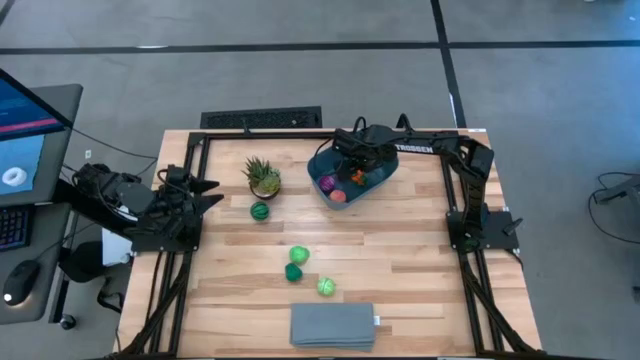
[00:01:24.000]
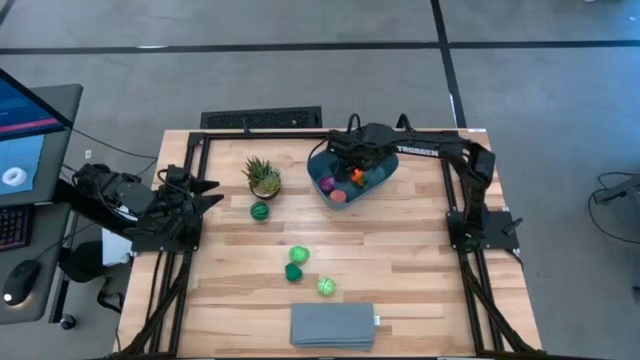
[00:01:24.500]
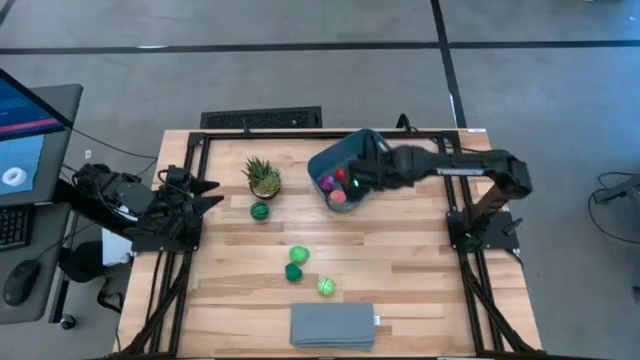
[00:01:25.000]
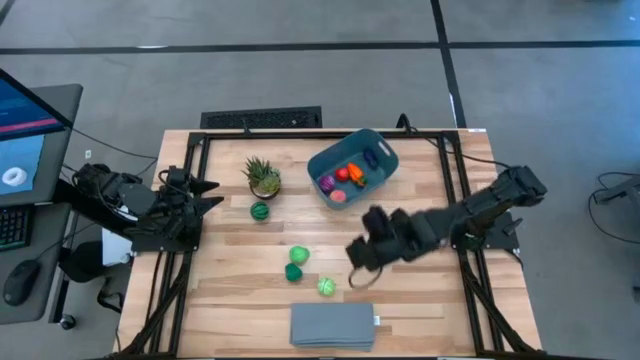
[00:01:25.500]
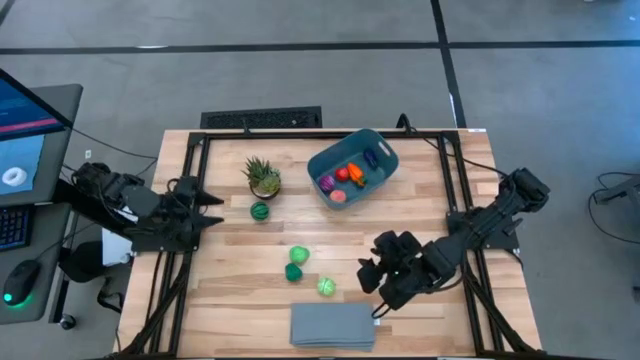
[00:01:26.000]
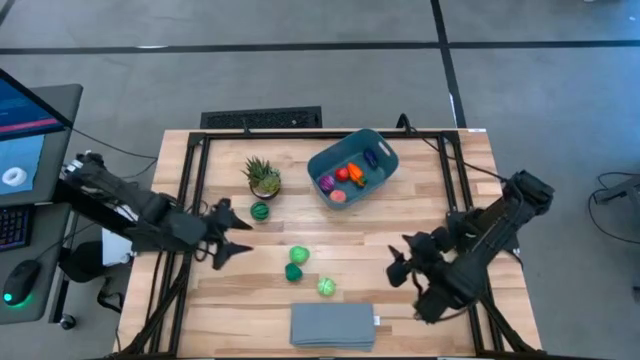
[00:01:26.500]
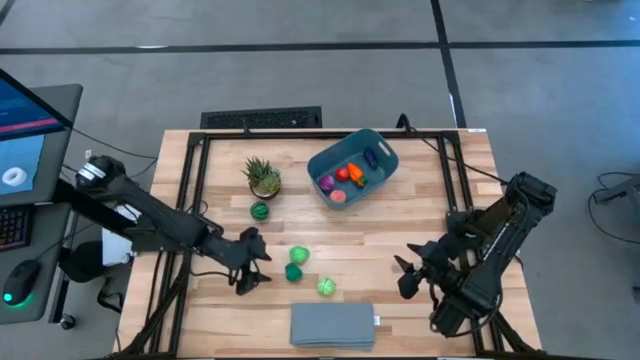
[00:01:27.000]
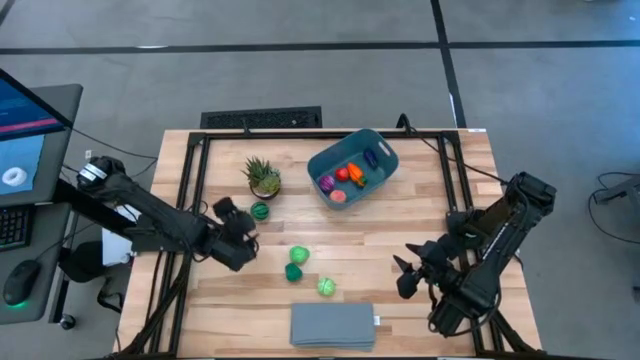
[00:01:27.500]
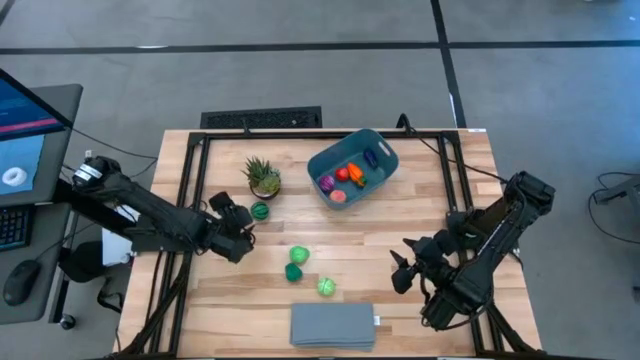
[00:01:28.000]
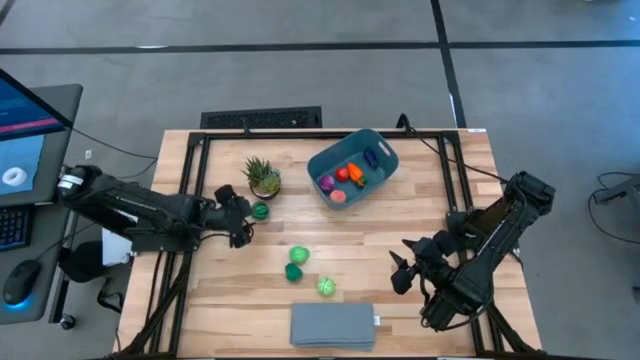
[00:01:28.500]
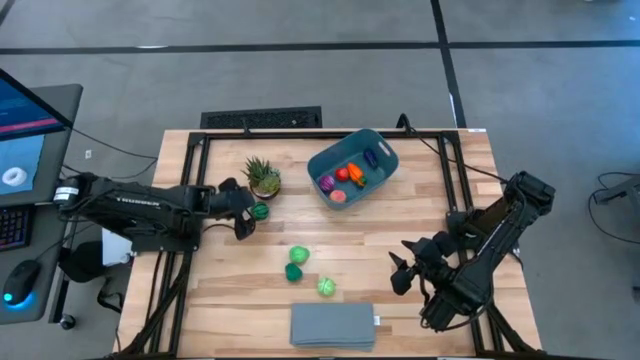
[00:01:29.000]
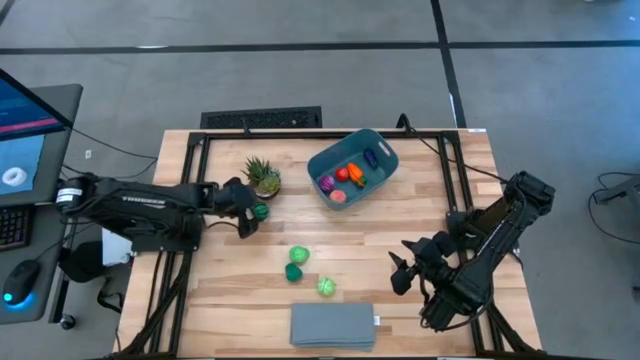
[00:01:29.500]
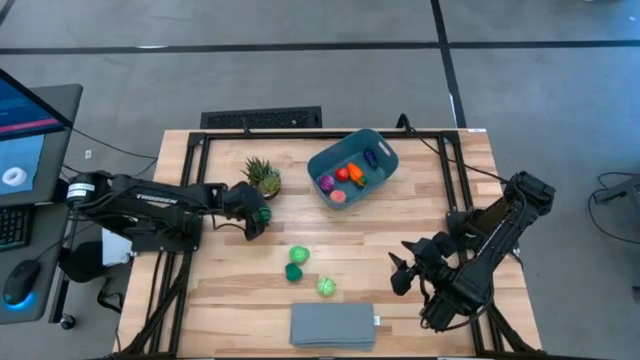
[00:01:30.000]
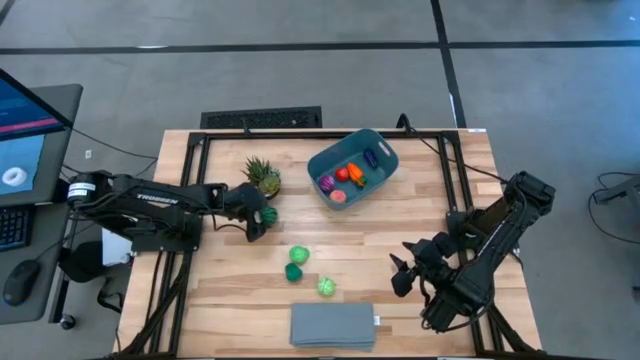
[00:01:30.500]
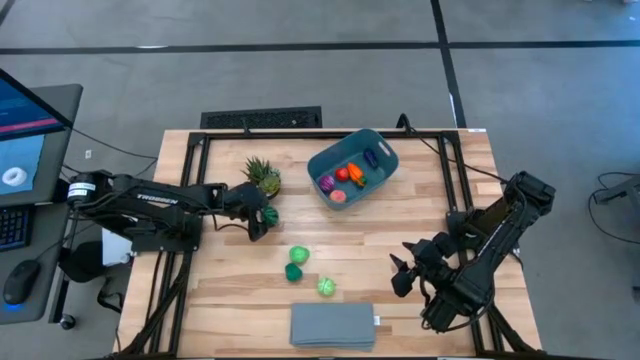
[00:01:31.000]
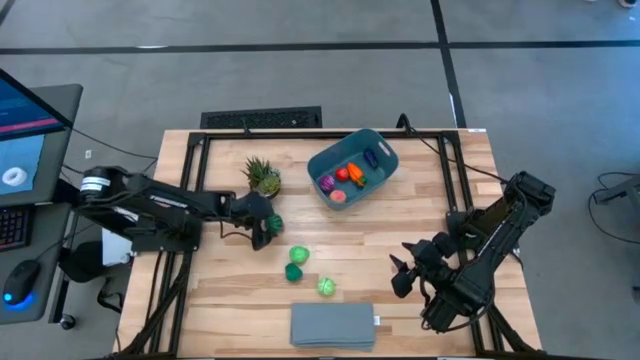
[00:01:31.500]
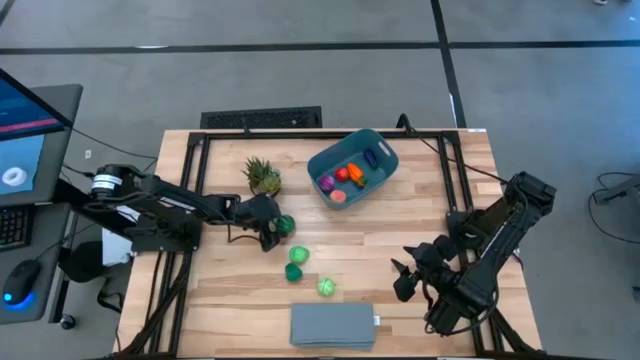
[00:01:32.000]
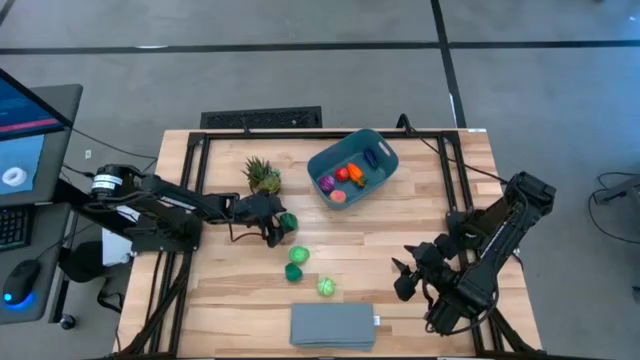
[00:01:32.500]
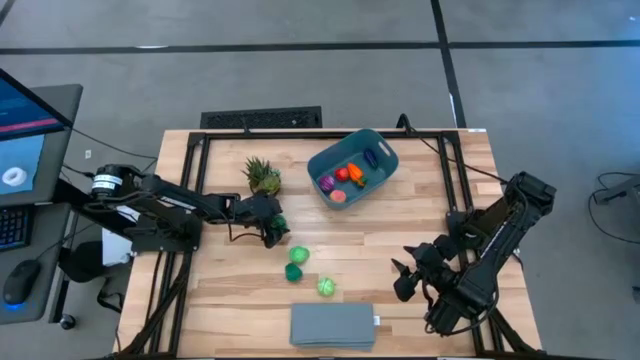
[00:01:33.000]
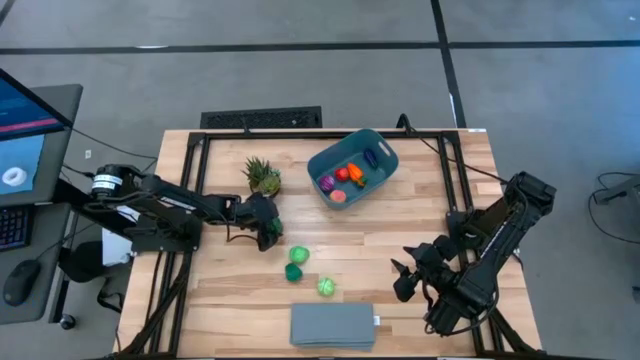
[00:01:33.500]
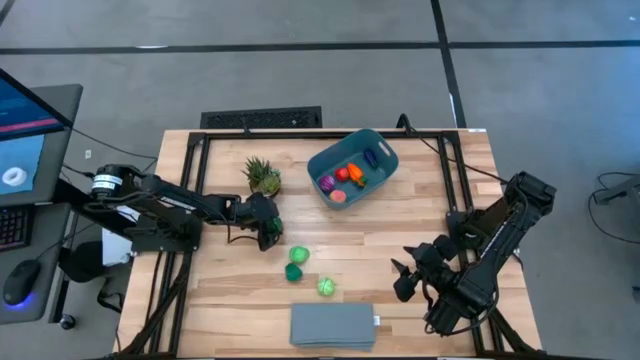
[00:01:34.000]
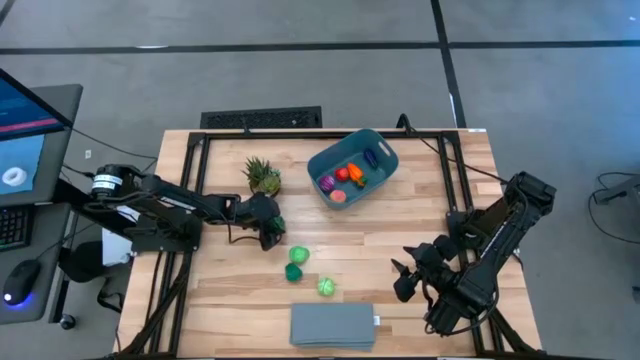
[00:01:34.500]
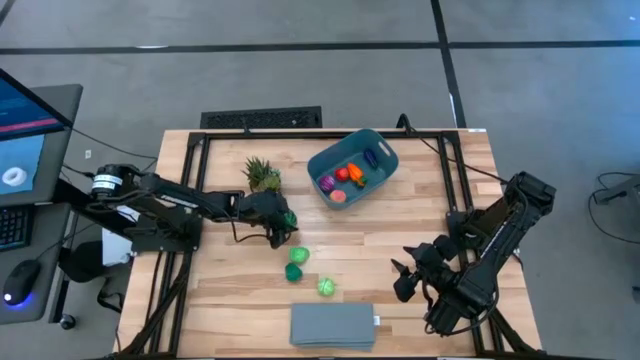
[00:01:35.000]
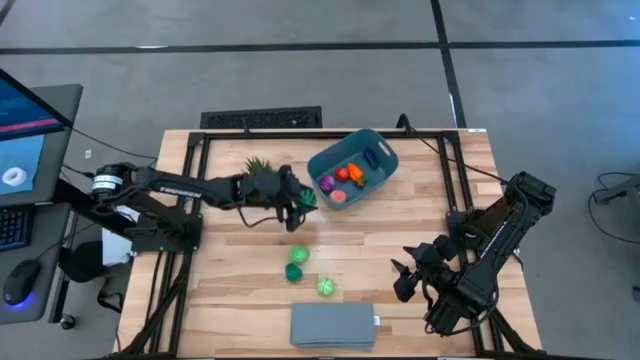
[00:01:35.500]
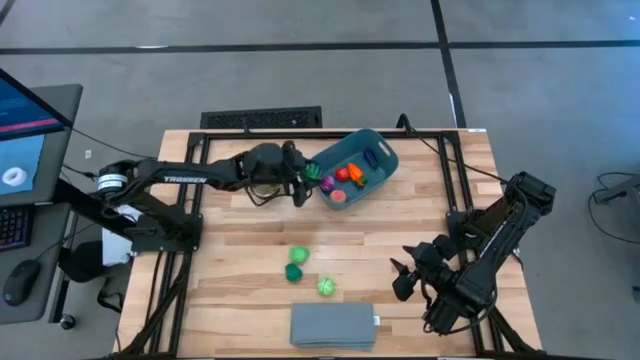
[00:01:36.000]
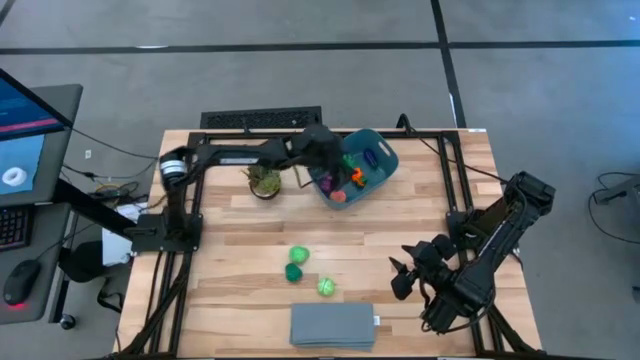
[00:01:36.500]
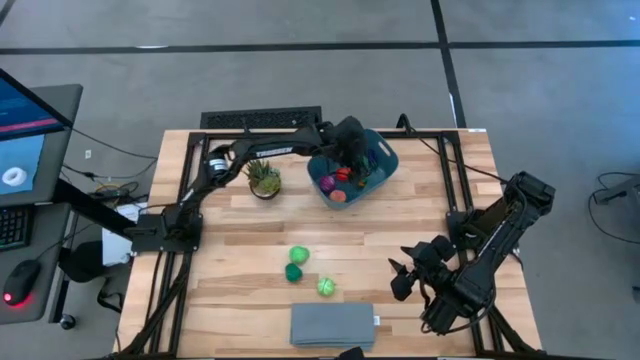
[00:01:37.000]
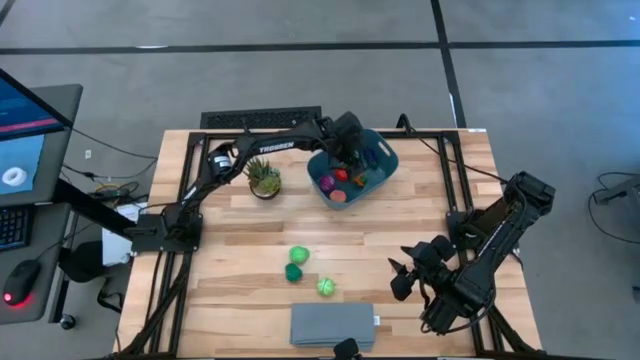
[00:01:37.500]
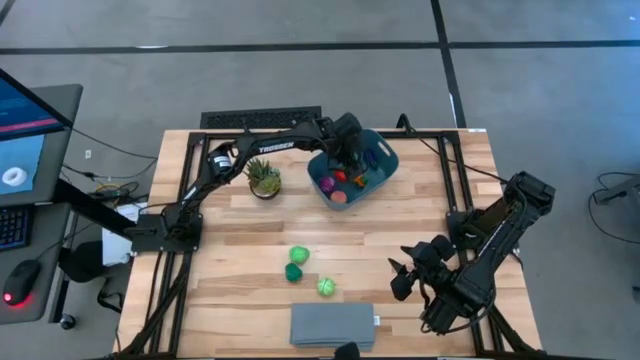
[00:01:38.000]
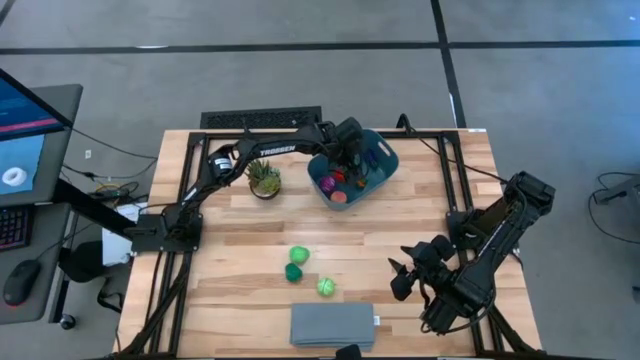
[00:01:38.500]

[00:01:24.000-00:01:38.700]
Task: Pick and placing Produce into tupperware
Put the watermelon into the bin

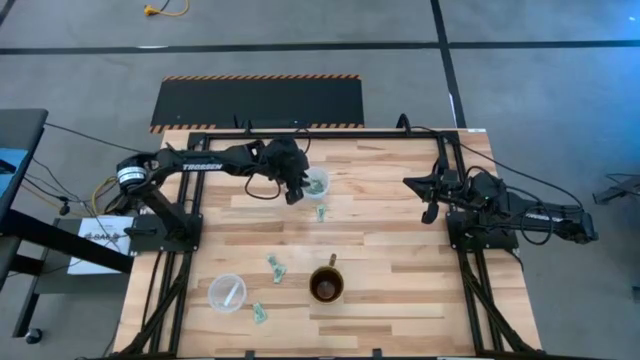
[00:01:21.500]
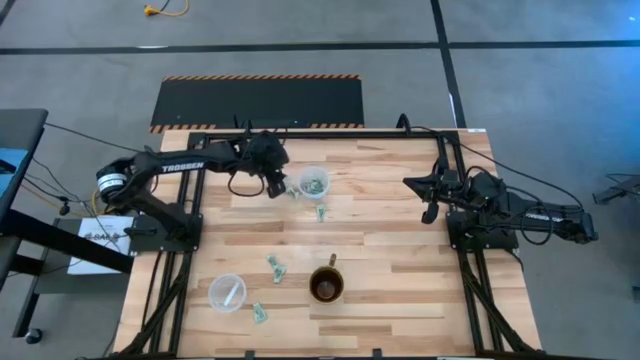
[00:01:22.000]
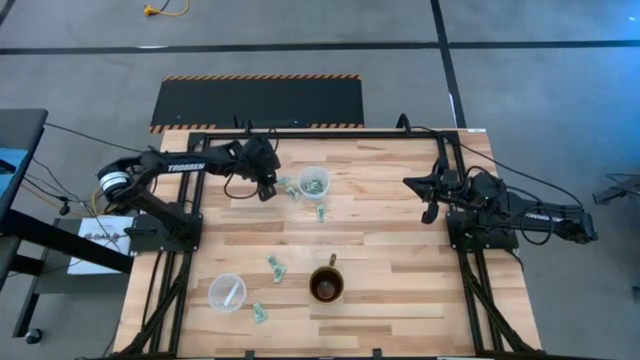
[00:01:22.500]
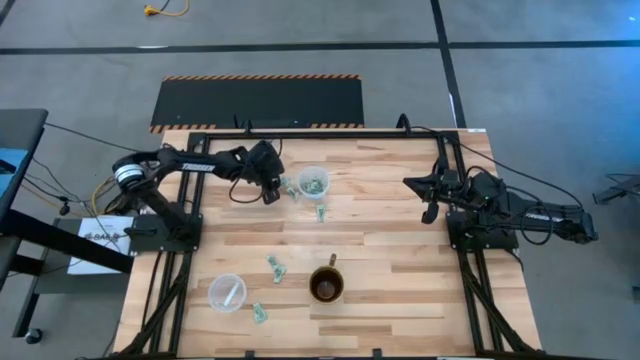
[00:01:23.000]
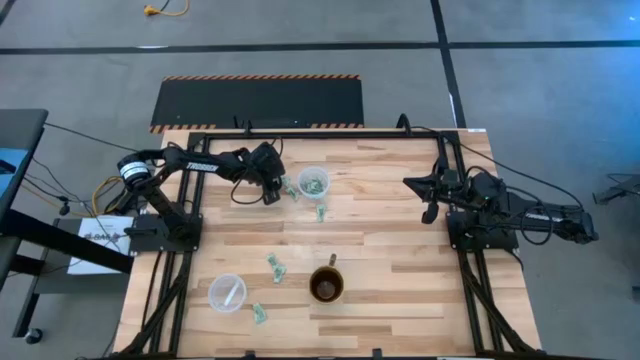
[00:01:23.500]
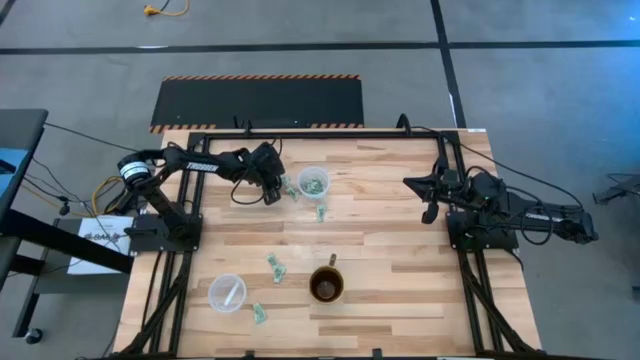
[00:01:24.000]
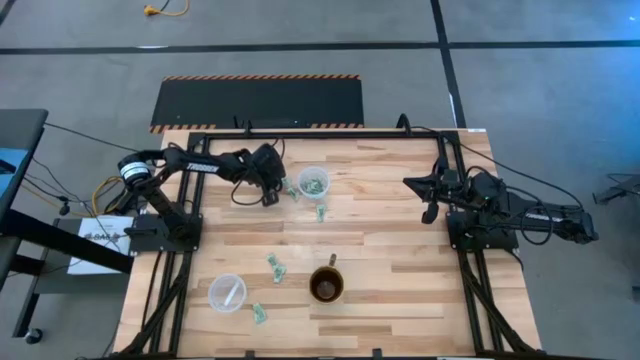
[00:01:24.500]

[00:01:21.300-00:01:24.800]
Task: Pick and place items into bin
Put the stevia packet into the top transparent bin
